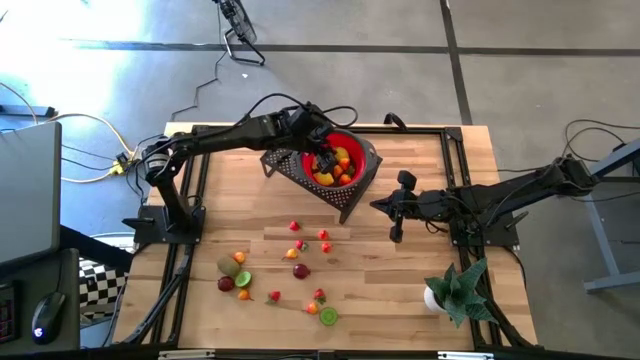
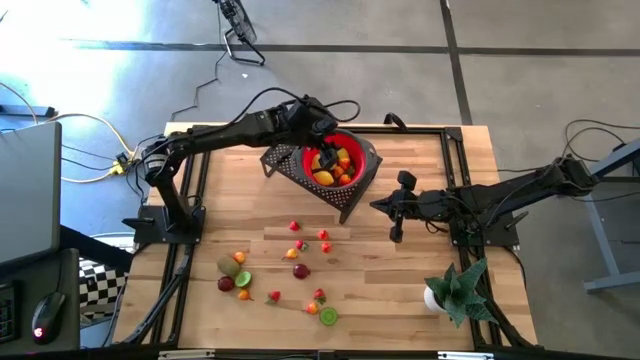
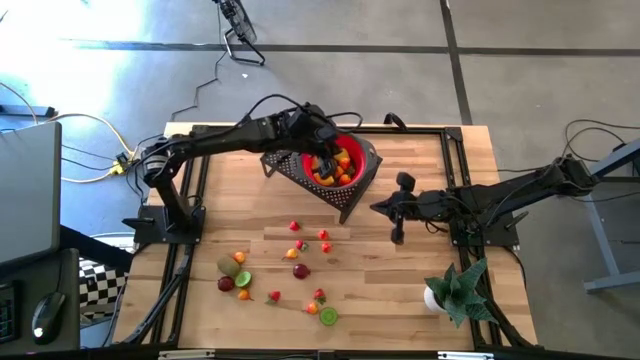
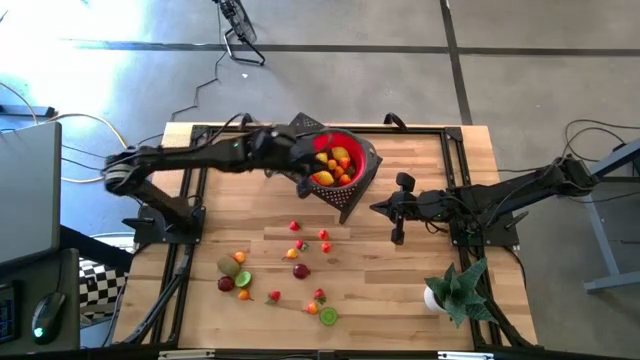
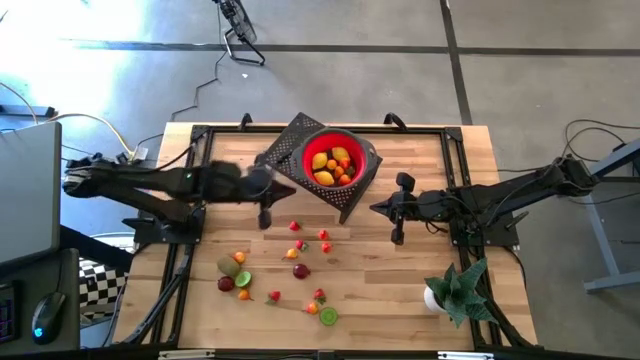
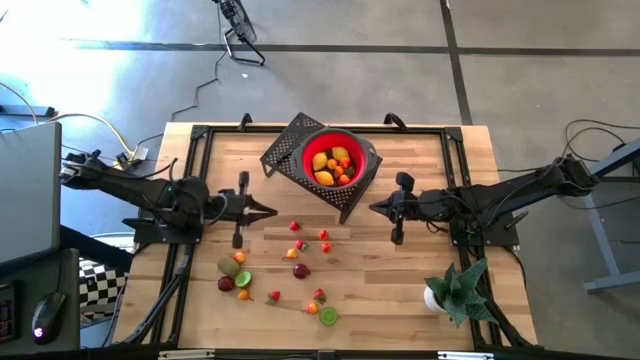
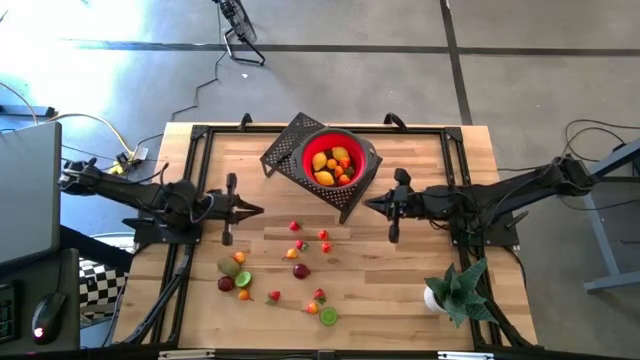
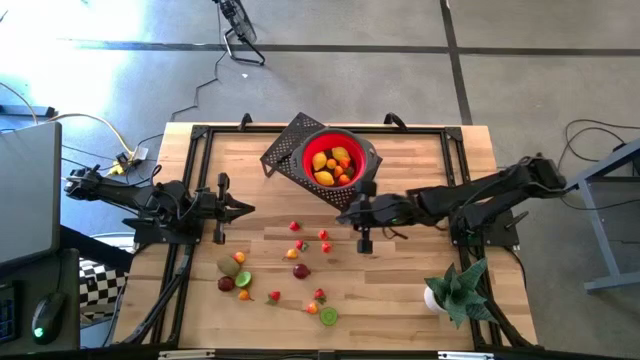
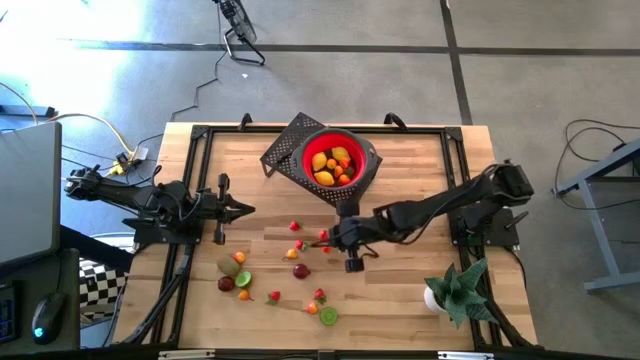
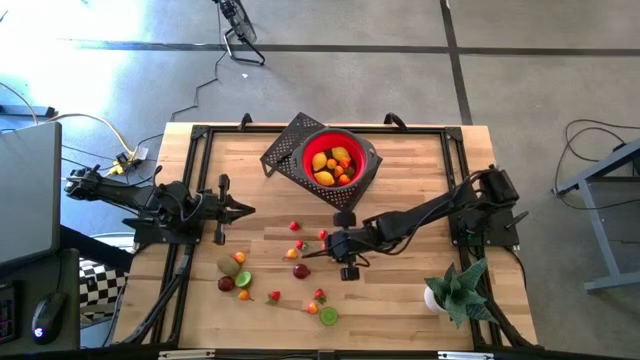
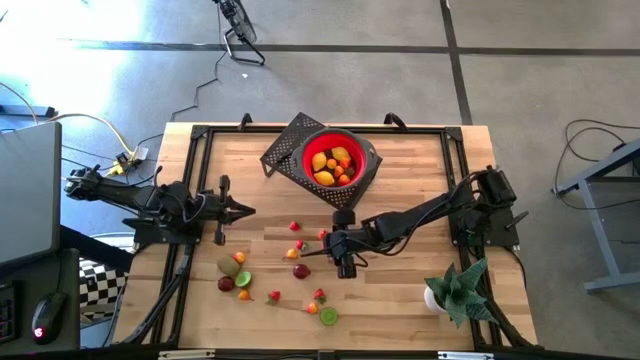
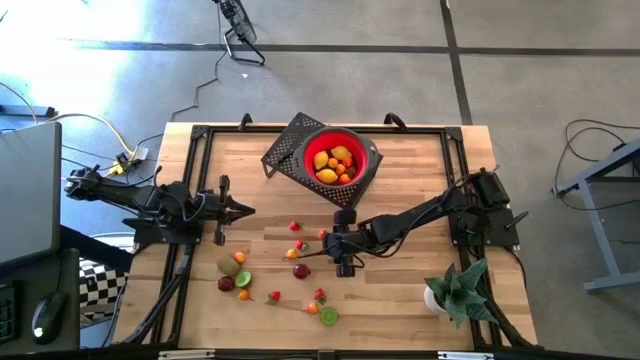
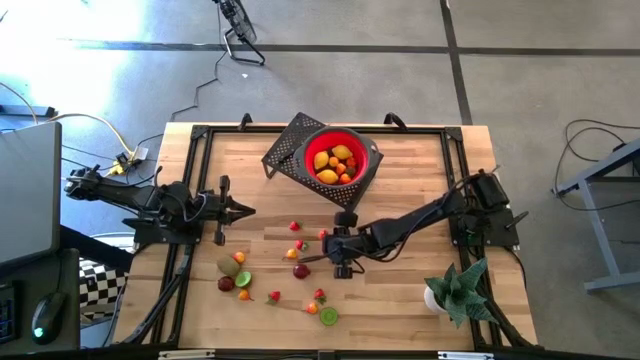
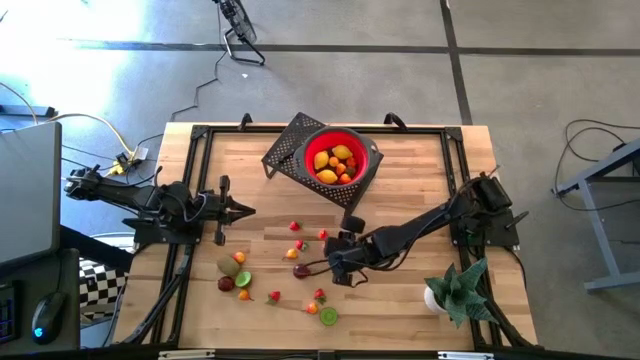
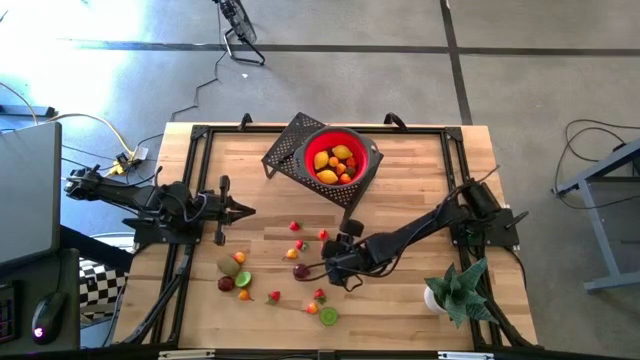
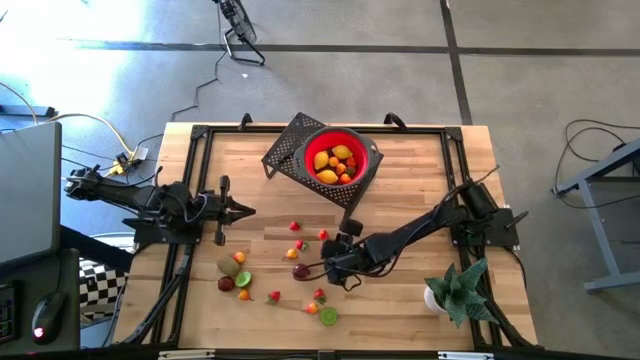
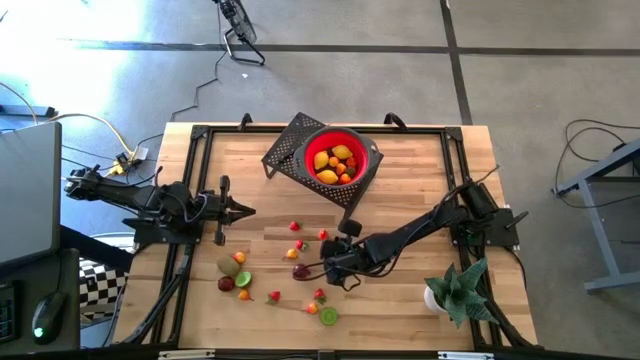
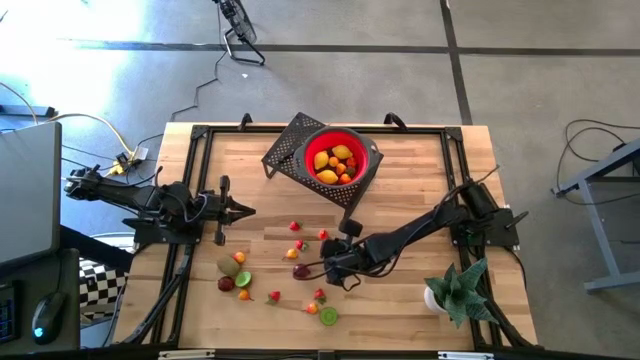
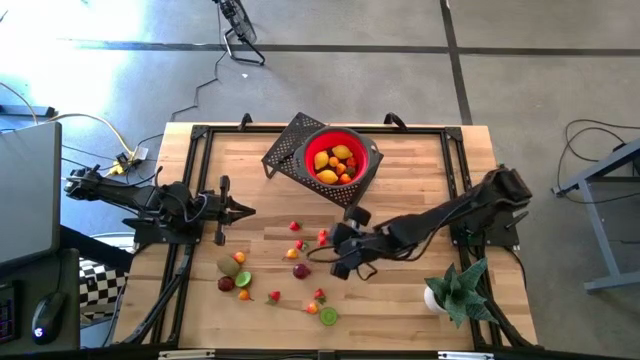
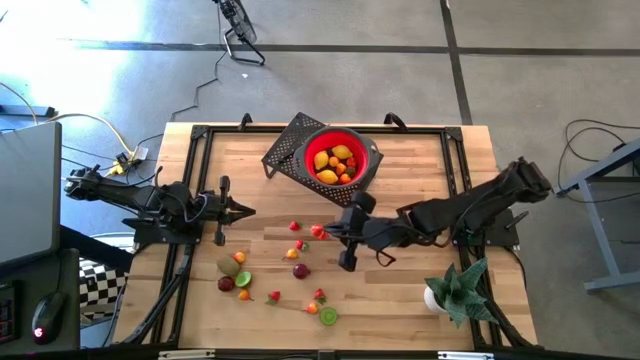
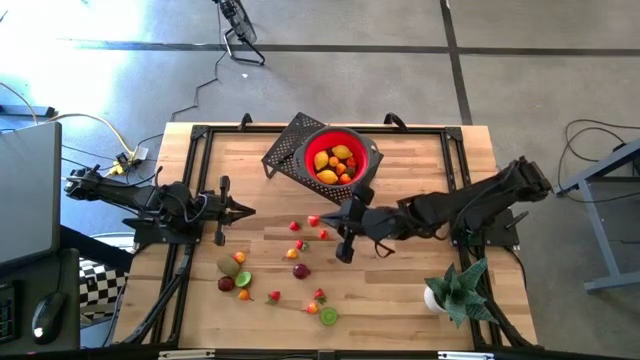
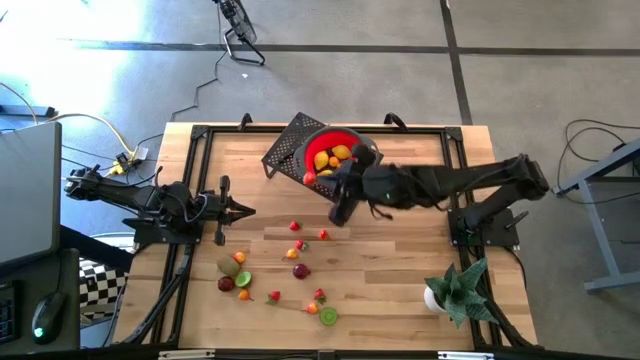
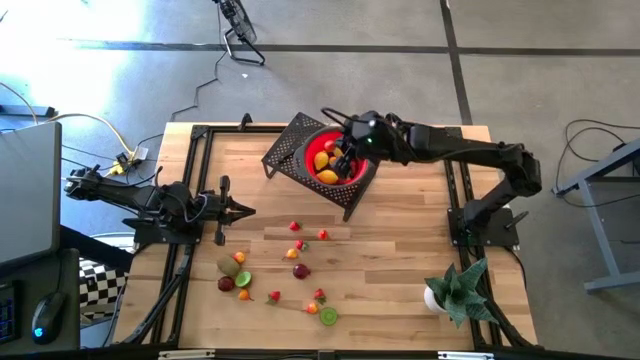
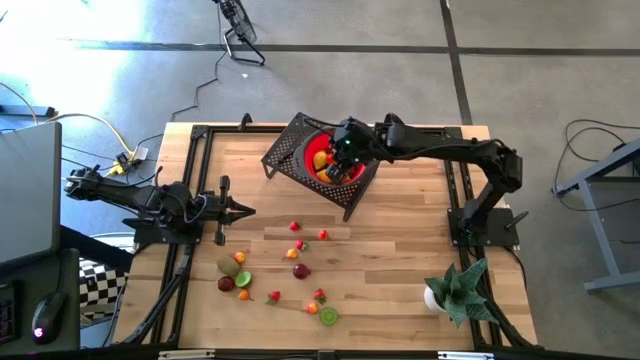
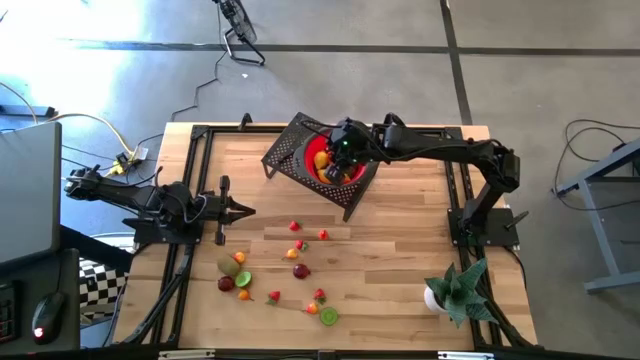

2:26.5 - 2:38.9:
Task: Pick & Place Fruit
Put the pear into the strainer bowl on the shelf

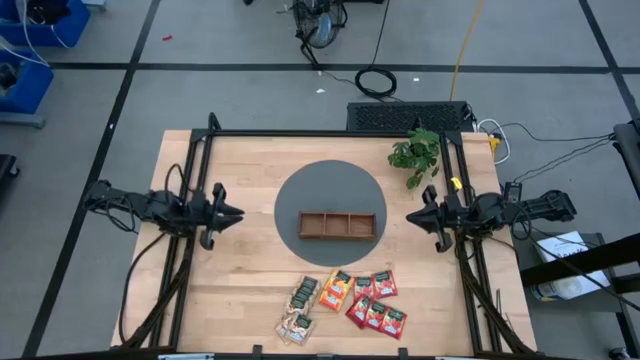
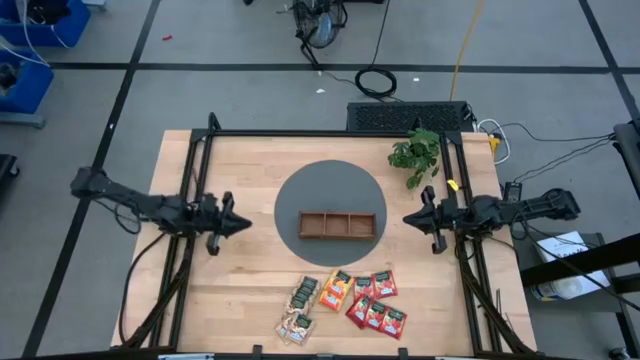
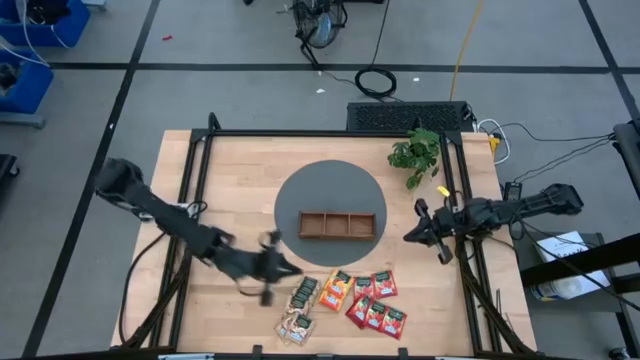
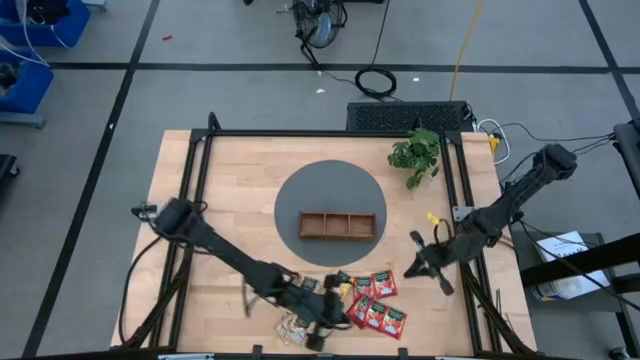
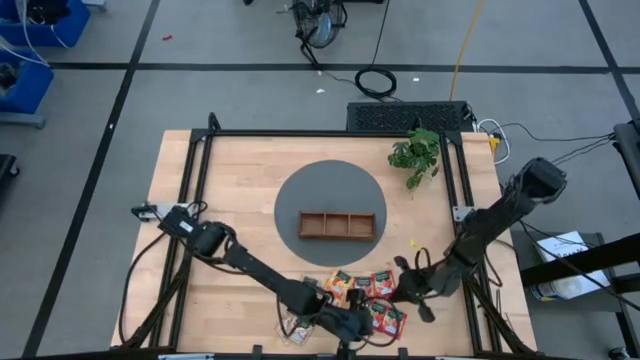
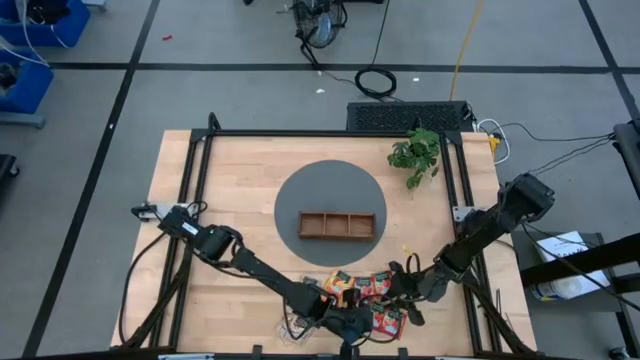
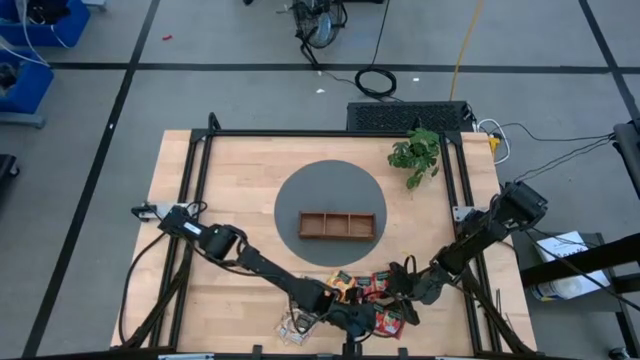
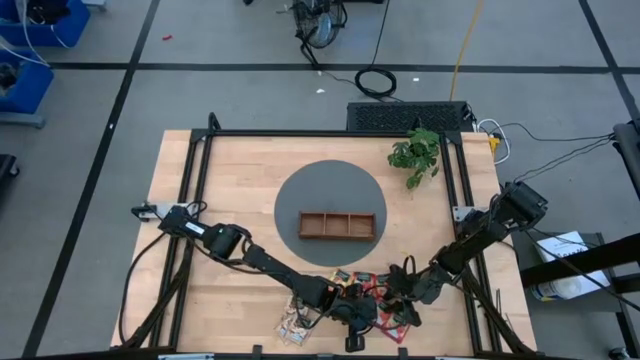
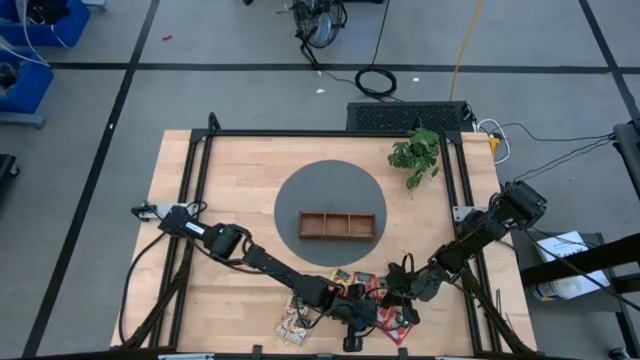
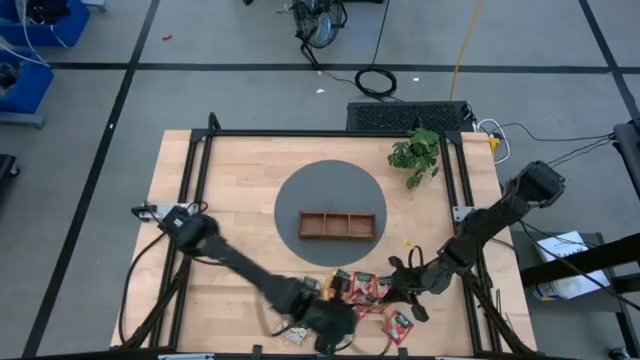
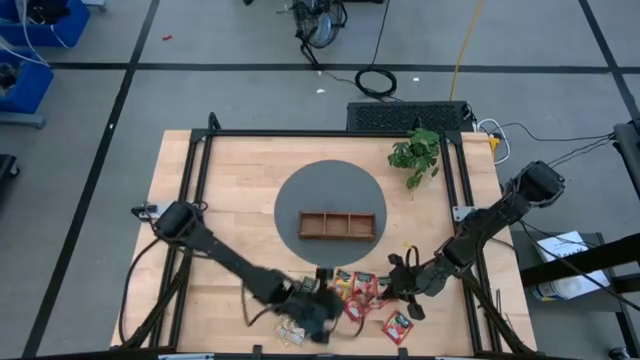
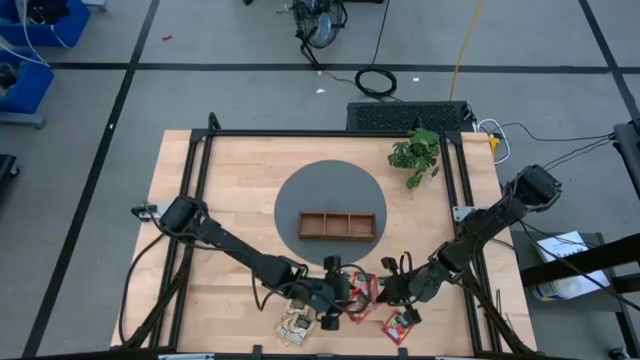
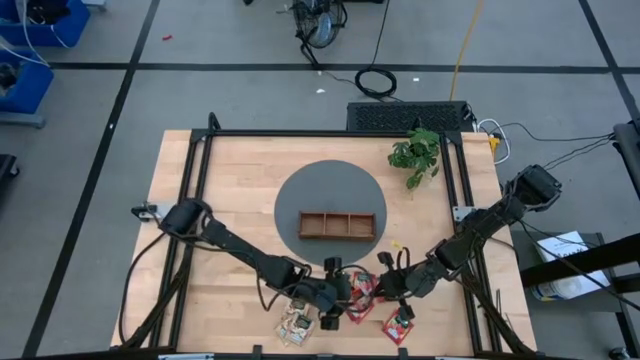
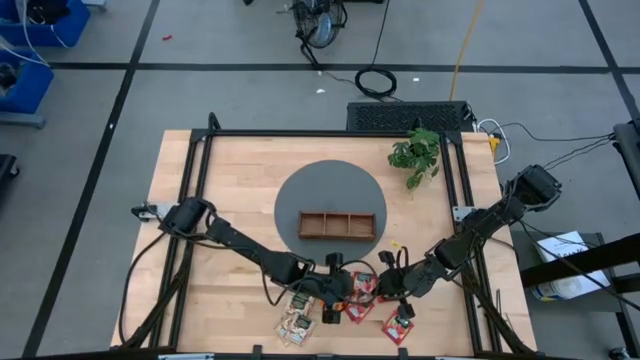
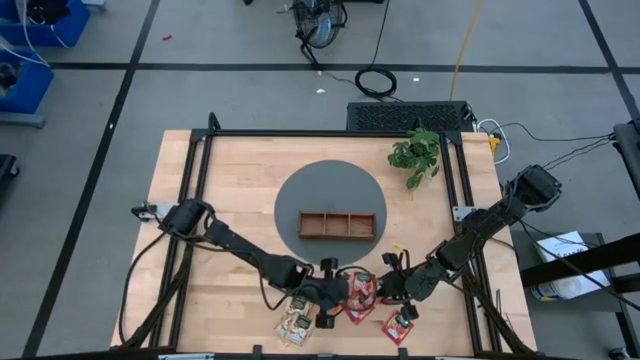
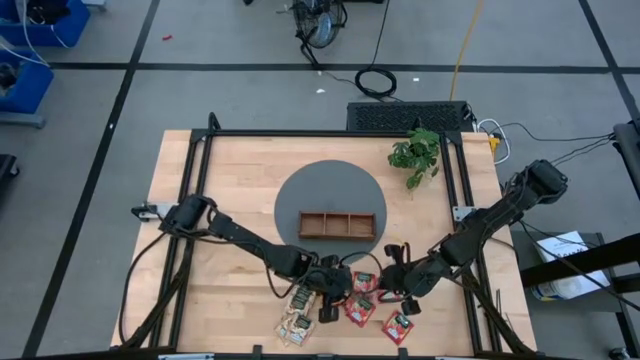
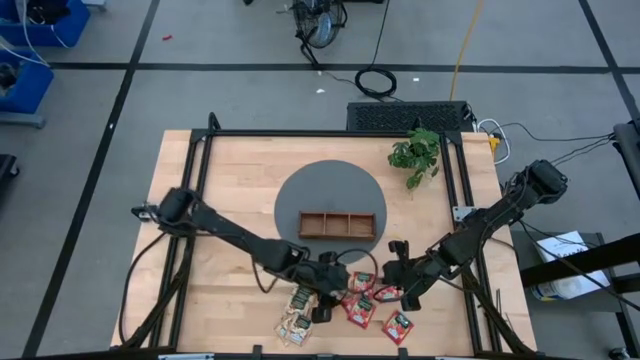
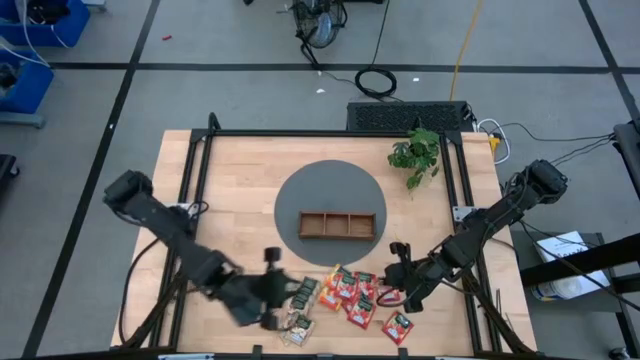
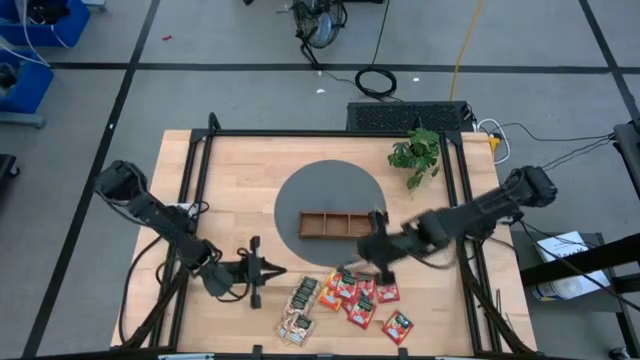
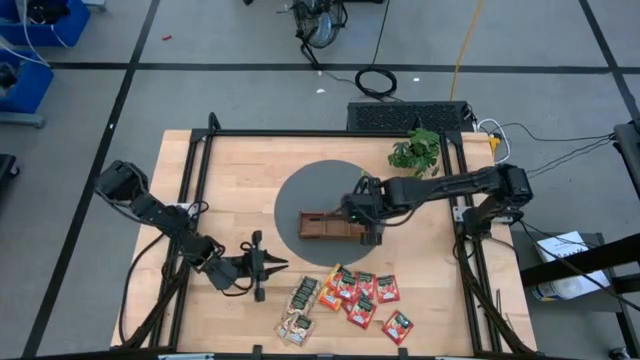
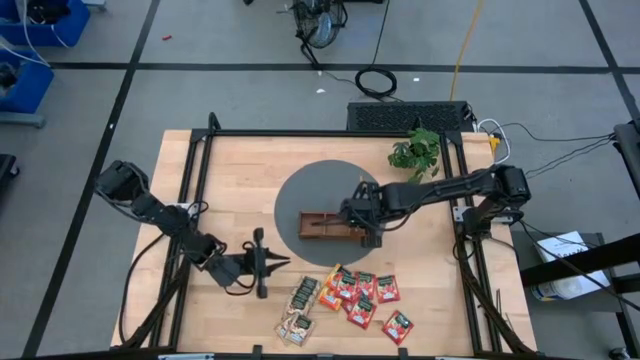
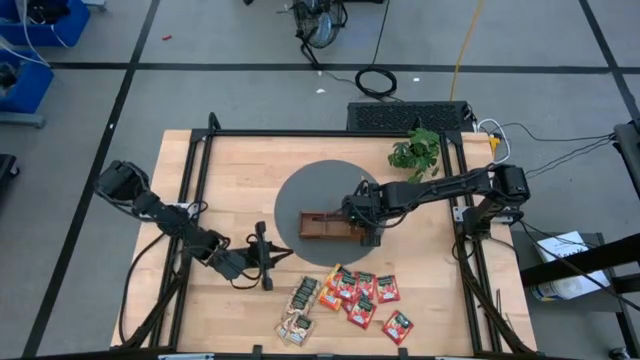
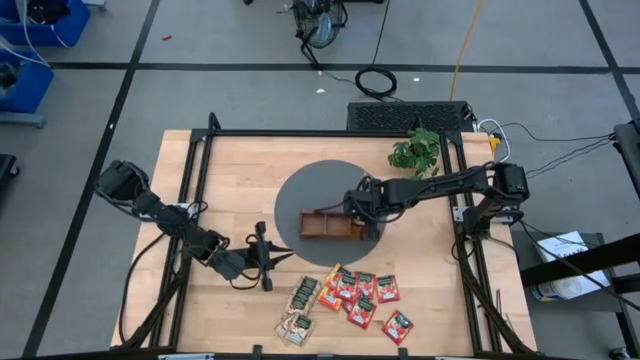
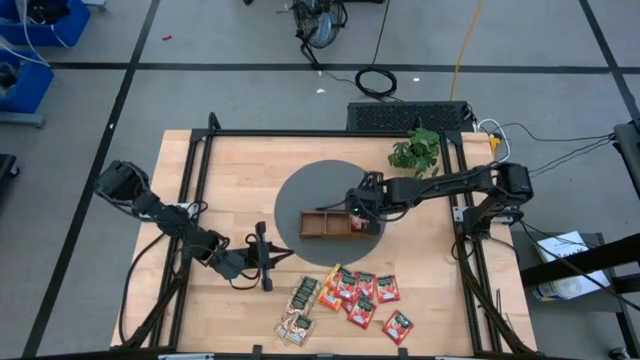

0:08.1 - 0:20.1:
Task: Pick & Place Tea
Put the red tea bag into the right section of the wooden organizer
